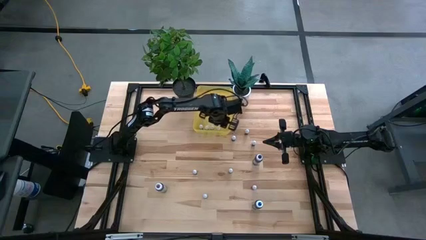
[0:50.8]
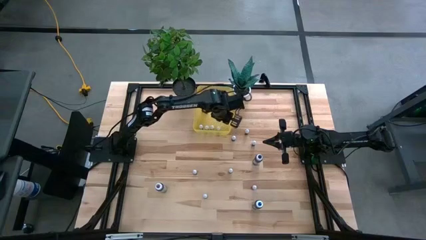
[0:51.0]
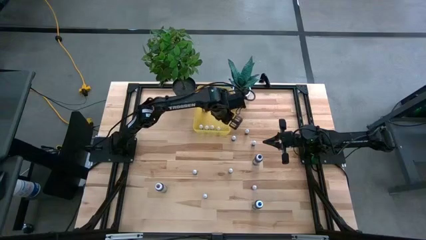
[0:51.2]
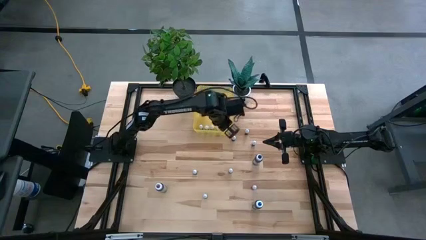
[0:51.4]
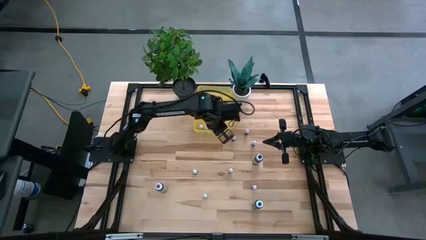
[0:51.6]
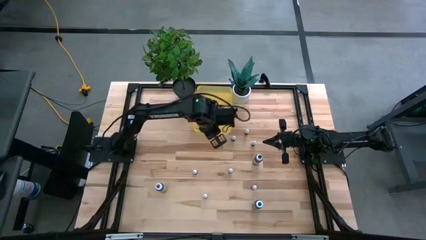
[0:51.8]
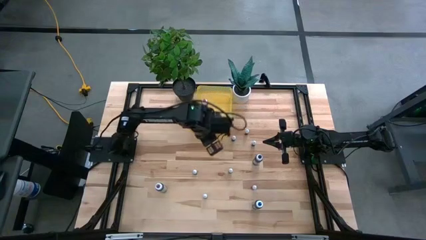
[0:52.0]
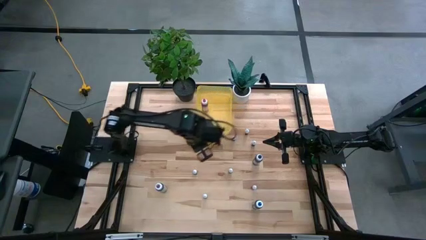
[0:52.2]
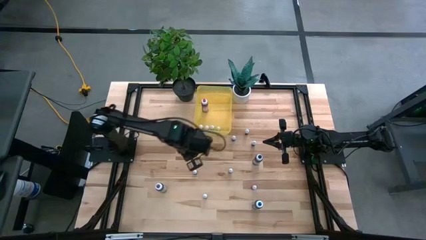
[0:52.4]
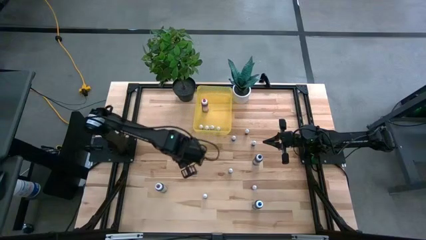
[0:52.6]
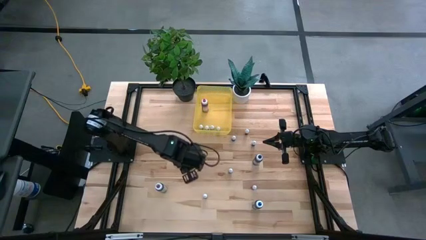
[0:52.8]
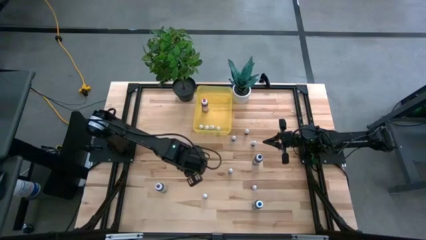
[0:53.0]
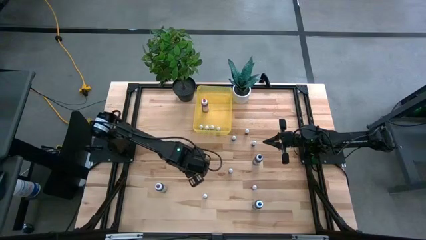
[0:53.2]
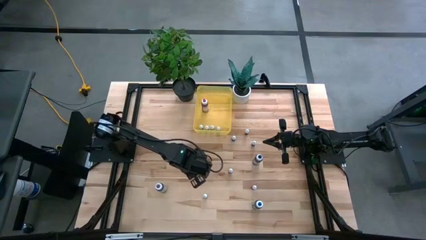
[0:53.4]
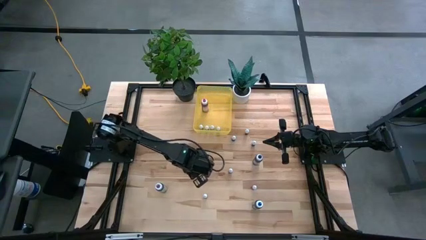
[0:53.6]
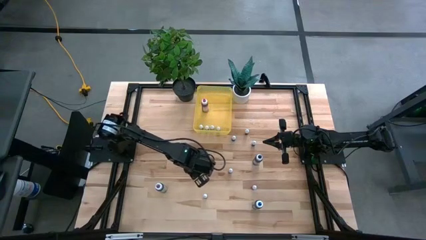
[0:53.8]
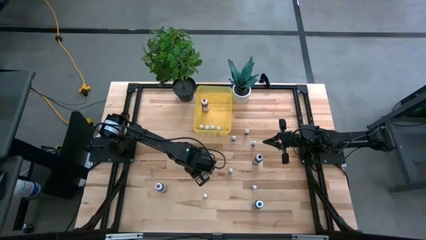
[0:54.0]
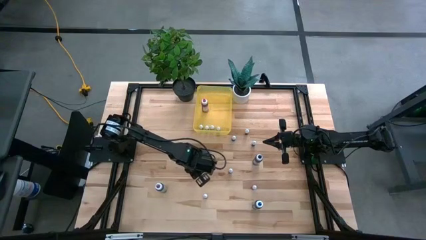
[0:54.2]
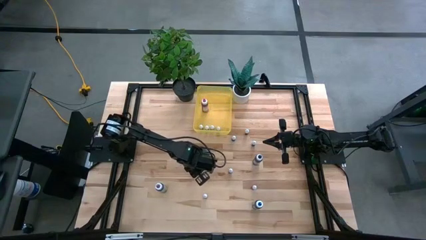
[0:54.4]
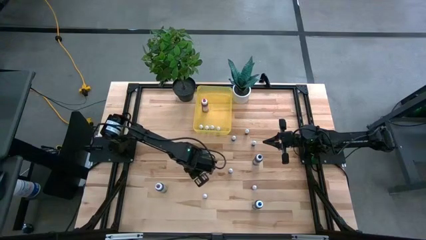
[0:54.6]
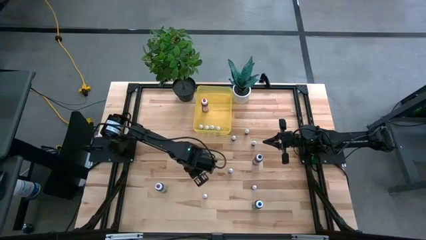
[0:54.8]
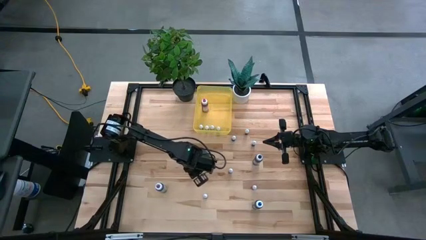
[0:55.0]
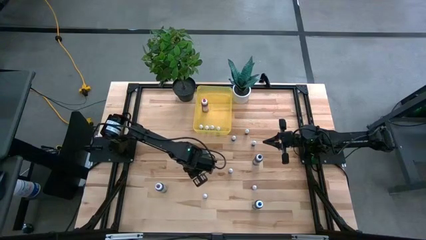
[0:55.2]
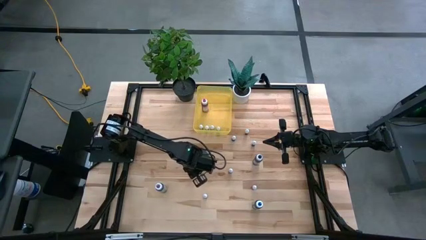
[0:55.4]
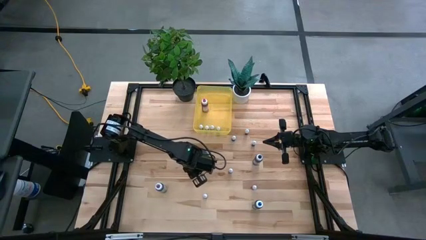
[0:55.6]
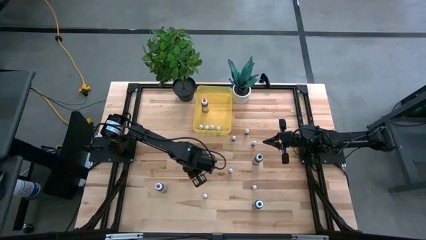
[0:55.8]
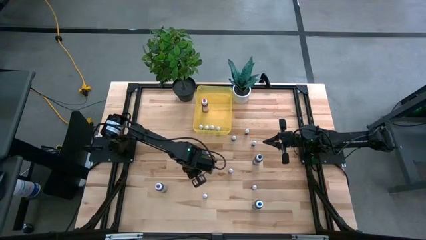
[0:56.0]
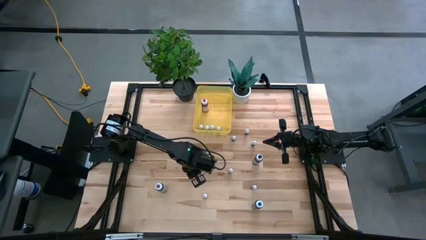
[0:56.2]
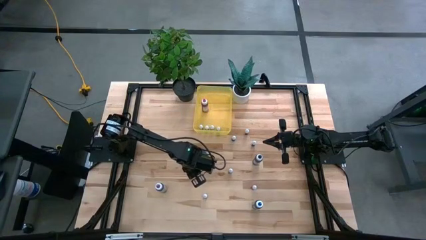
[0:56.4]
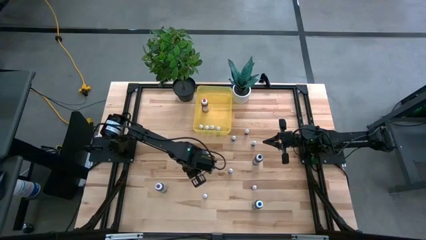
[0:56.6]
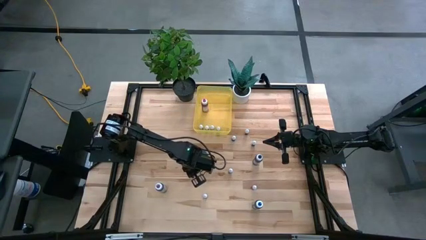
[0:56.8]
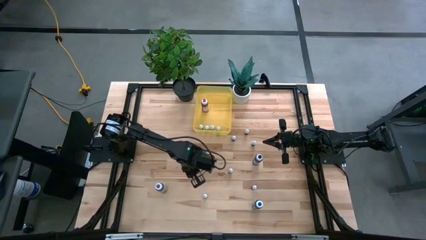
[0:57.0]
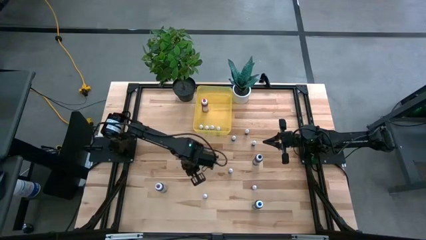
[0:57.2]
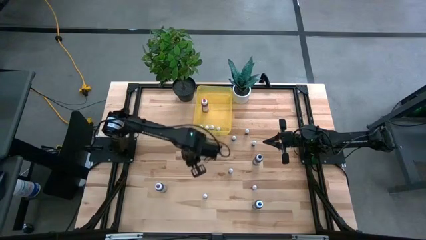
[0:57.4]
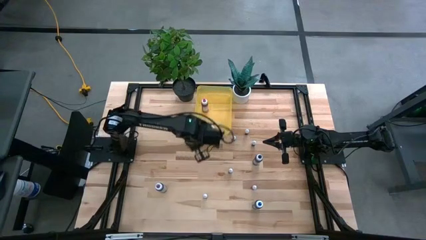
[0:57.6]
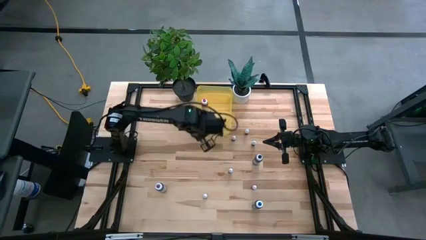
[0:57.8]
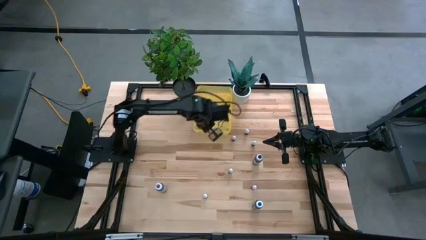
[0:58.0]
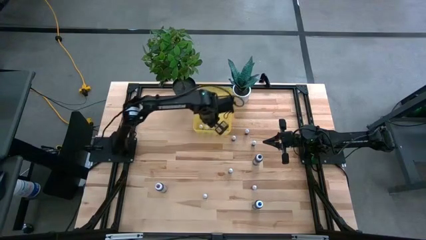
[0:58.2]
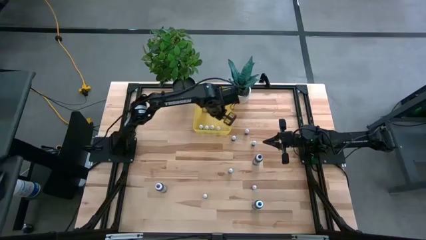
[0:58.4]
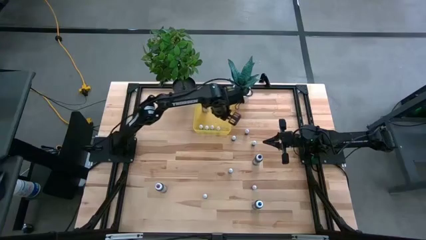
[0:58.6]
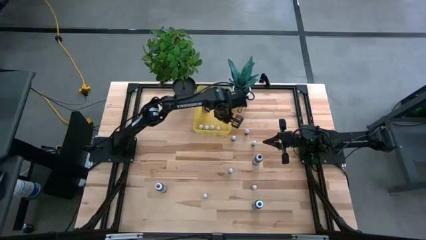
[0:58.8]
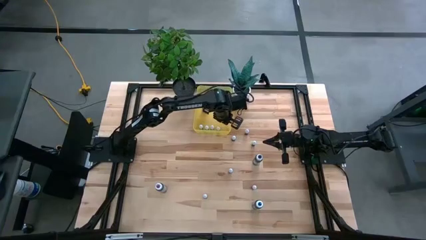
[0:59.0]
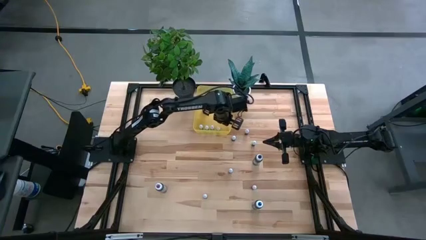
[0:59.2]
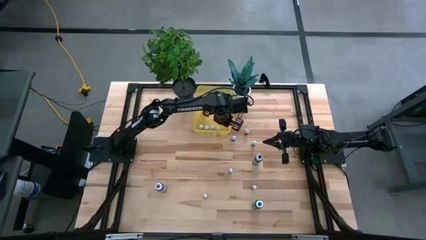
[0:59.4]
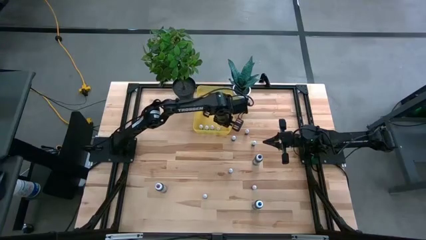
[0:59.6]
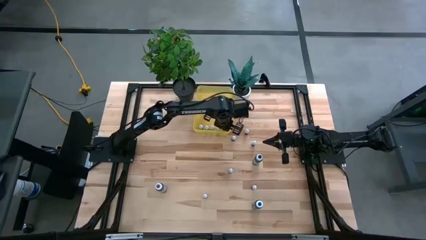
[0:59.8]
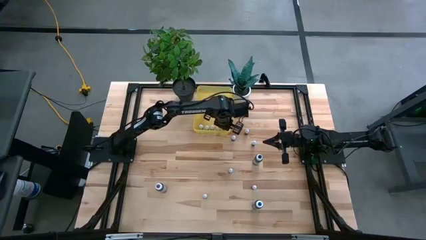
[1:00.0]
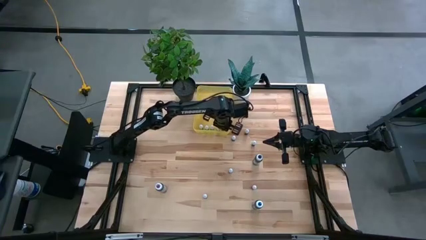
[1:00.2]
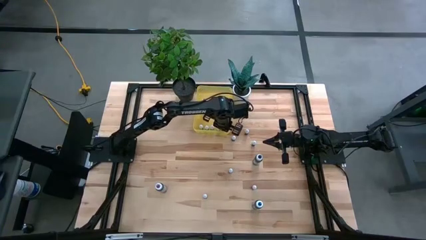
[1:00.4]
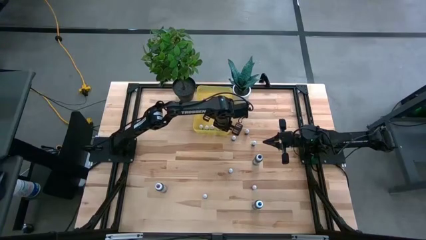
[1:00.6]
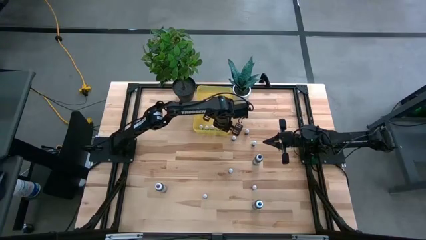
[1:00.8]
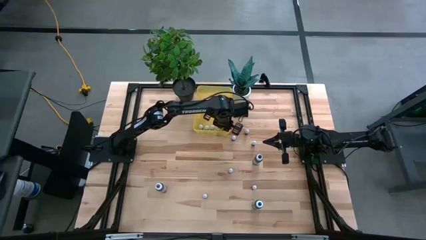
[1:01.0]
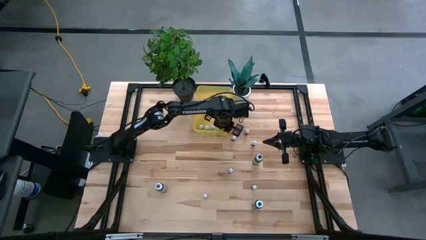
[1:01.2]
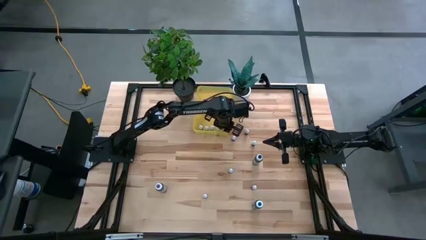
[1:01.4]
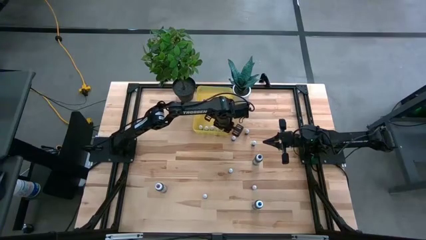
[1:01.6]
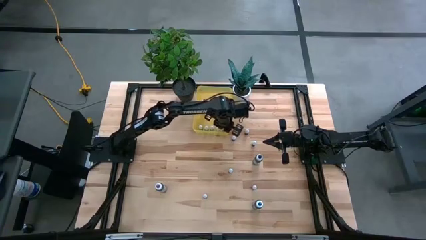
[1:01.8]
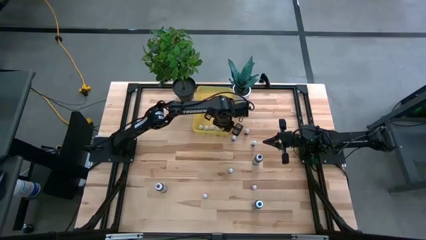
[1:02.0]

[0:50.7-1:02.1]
Task: Pick & Place food coloring
Put the small purple food coloring bottle into the yellow bin
